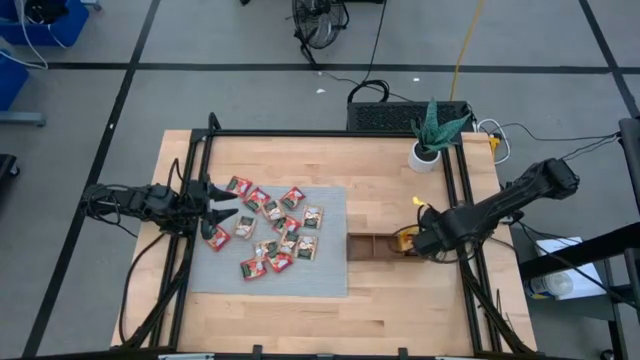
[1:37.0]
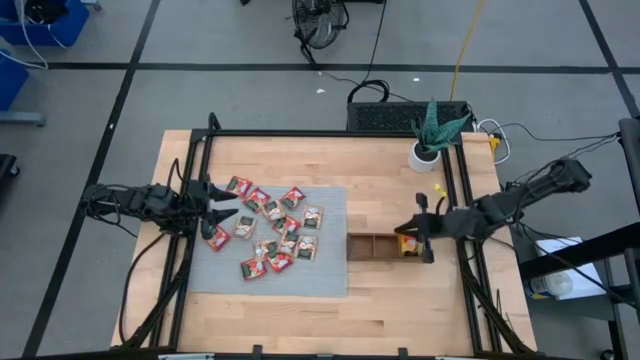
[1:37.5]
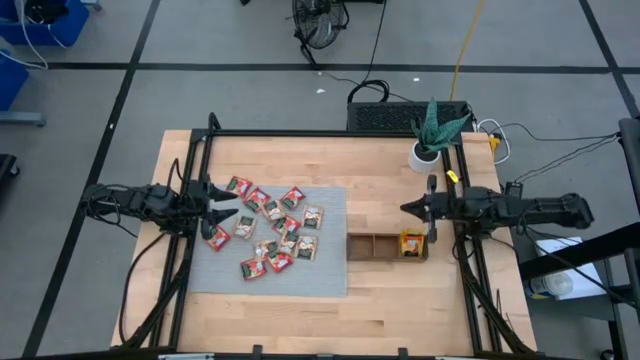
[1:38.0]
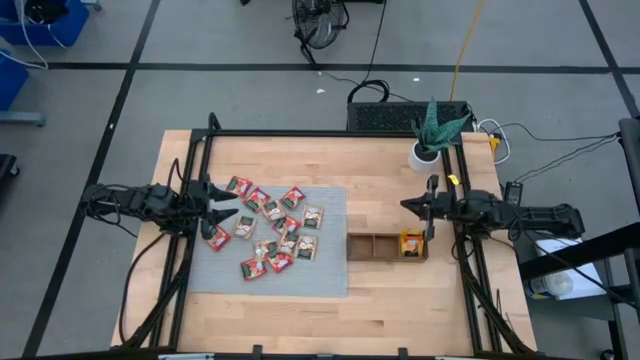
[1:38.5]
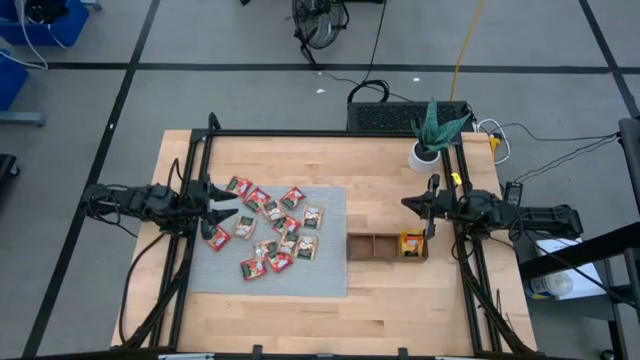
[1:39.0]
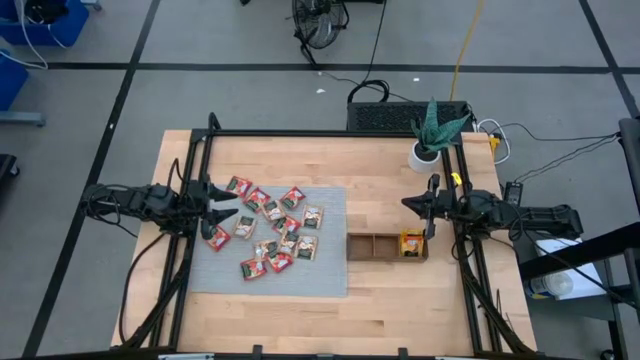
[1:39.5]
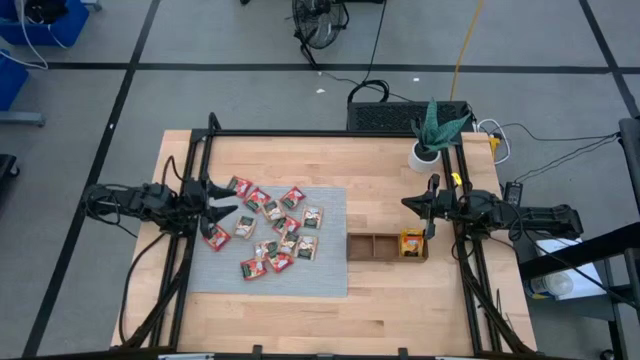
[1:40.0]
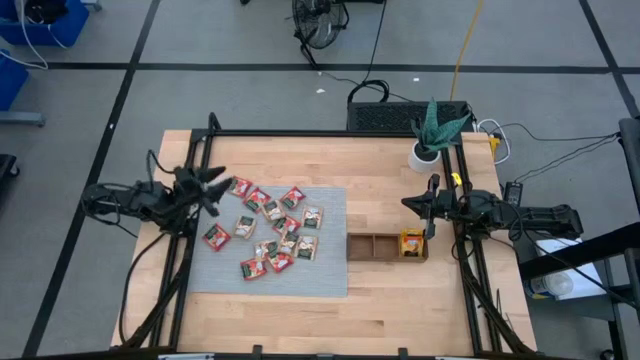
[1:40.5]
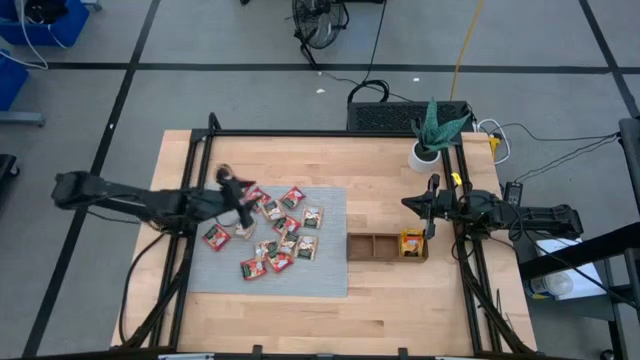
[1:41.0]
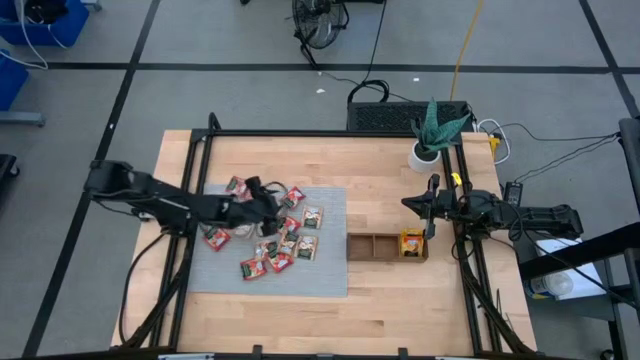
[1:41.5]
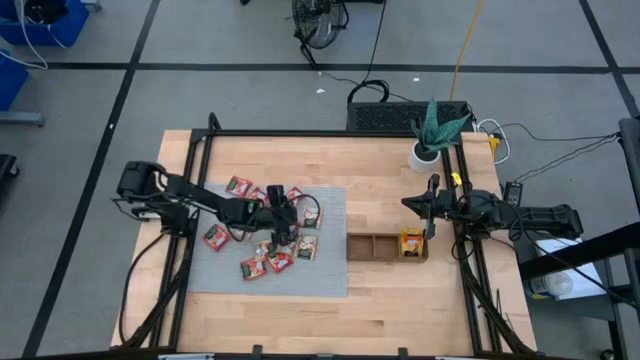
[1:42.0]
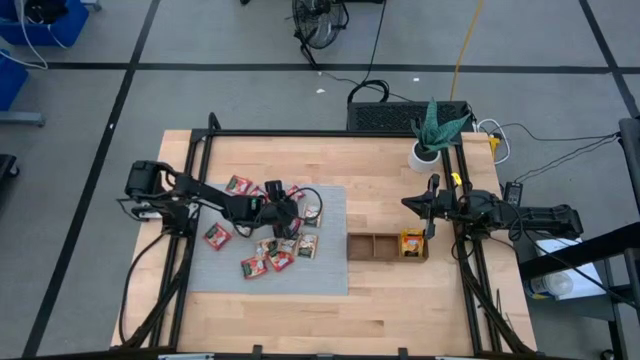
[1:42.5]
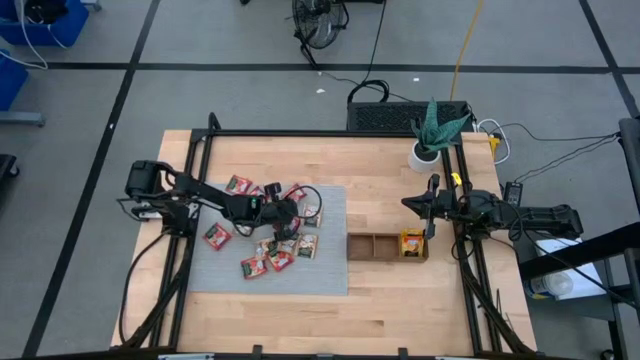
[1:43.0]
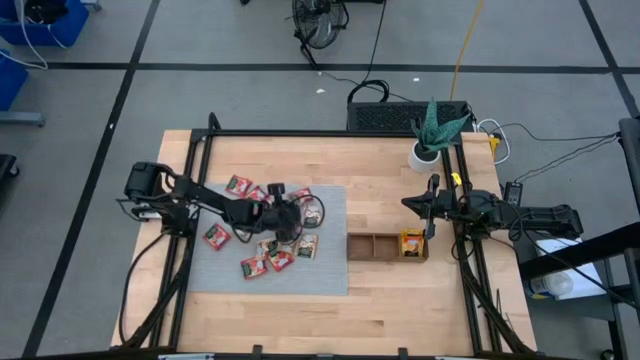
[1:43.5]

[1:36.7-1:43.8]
Task: Pick & Place Tea
Put the red tea bag into the middle section of the wooden organizer

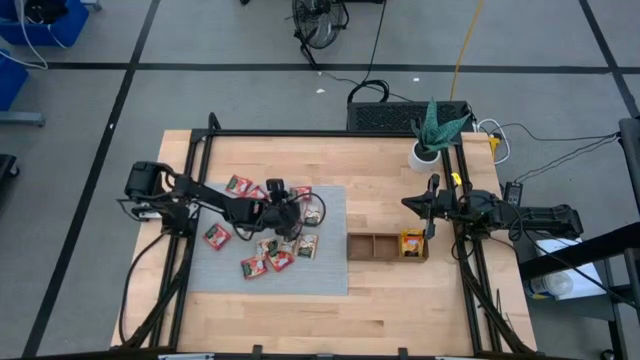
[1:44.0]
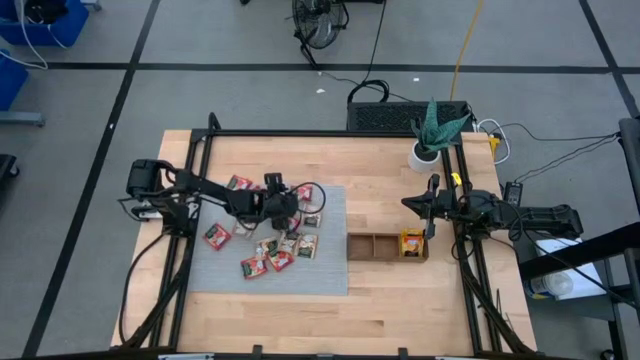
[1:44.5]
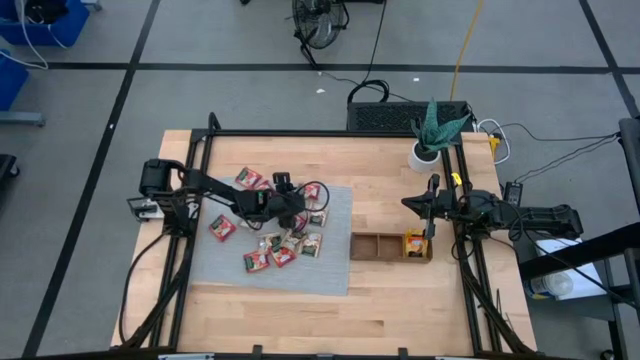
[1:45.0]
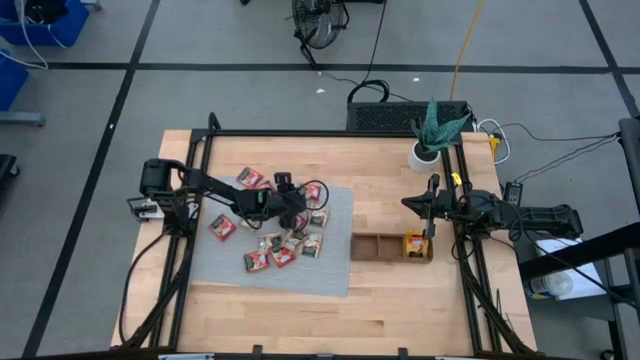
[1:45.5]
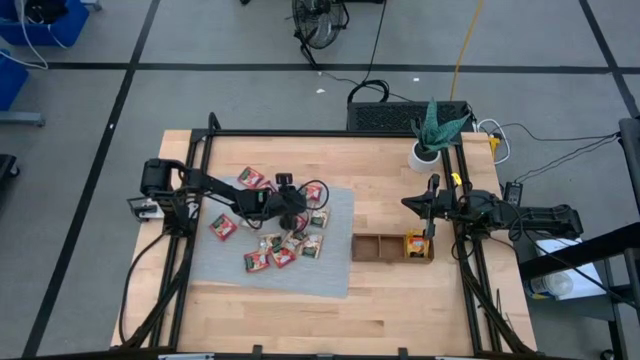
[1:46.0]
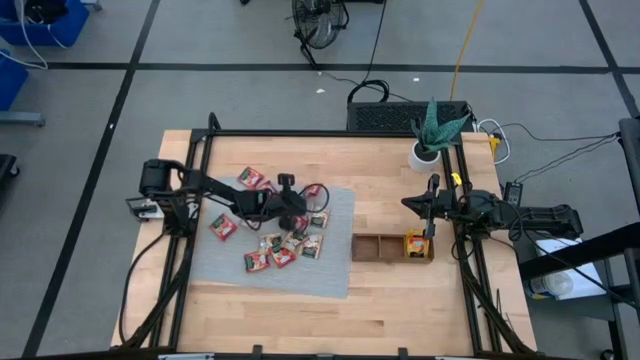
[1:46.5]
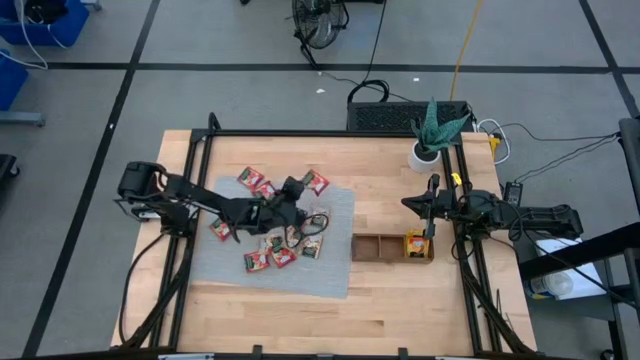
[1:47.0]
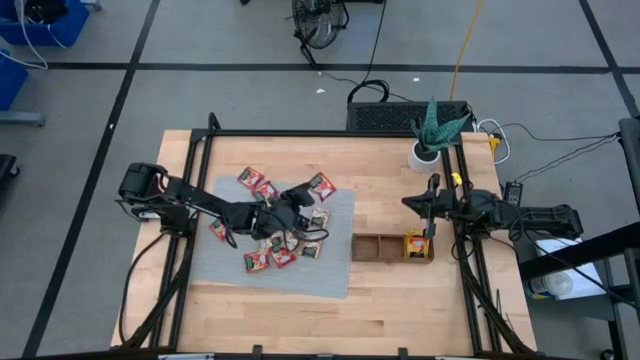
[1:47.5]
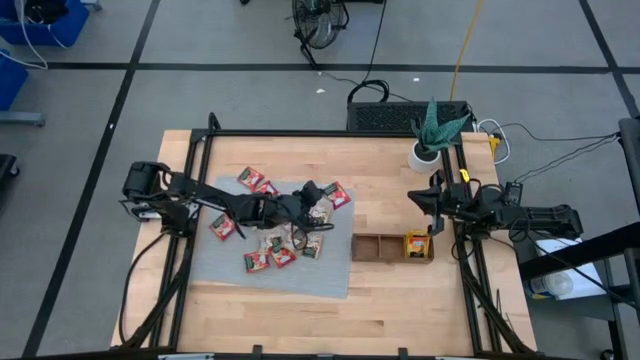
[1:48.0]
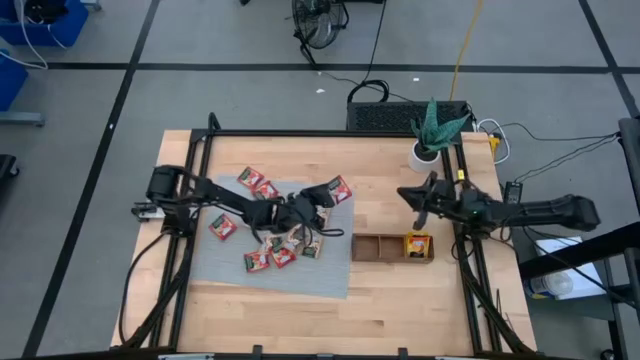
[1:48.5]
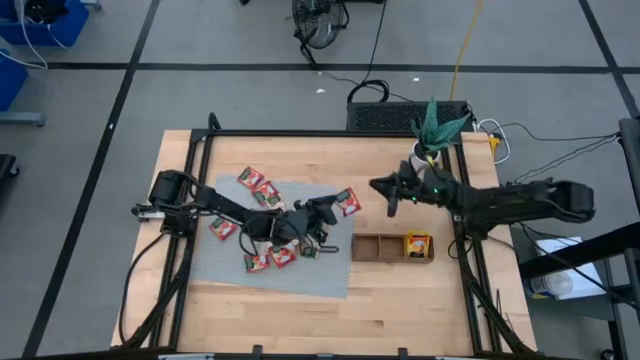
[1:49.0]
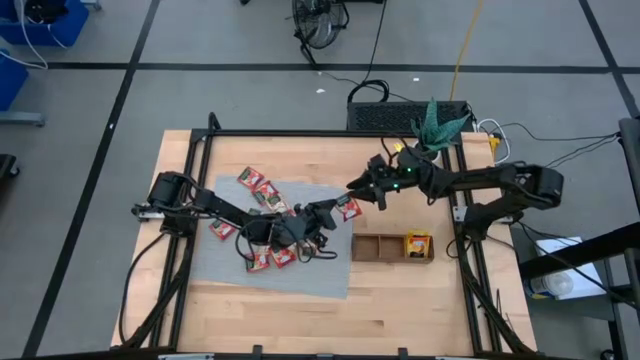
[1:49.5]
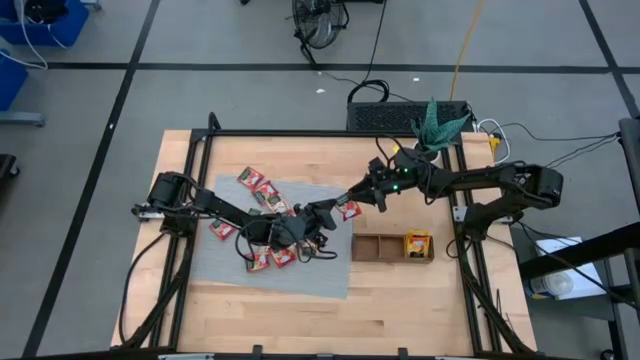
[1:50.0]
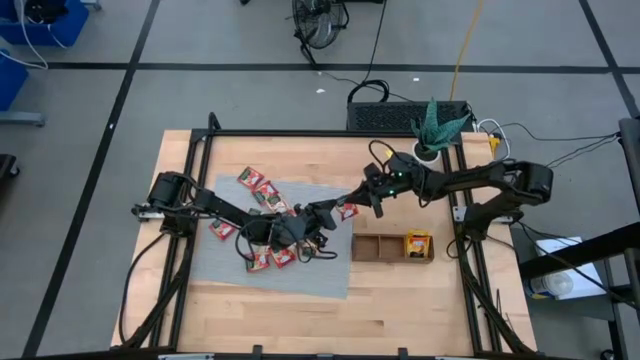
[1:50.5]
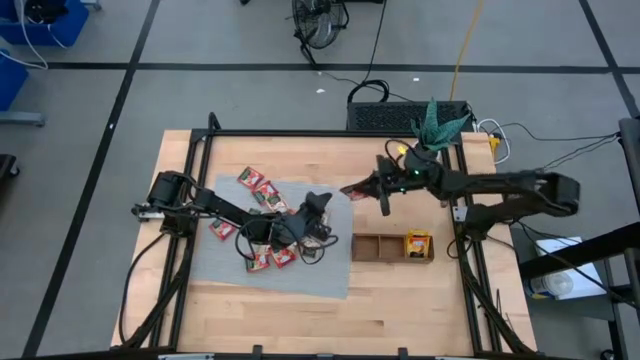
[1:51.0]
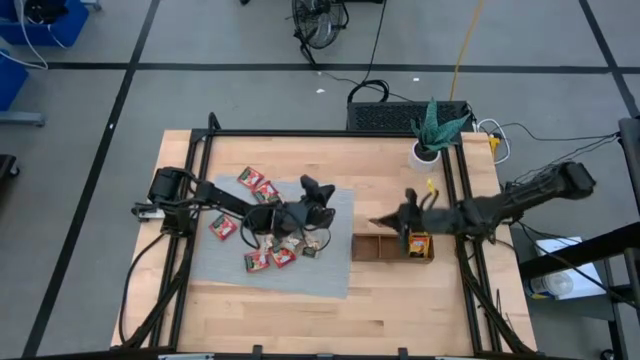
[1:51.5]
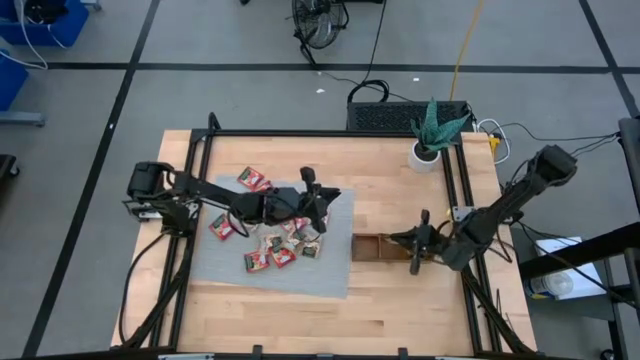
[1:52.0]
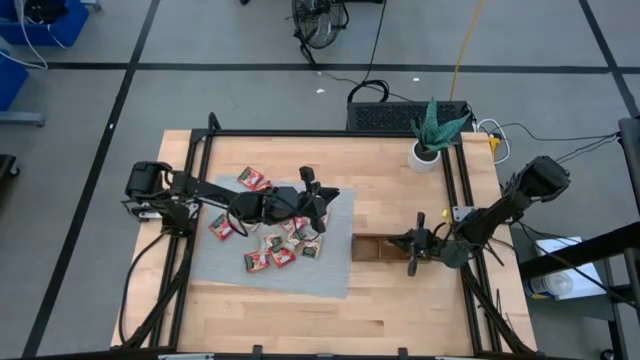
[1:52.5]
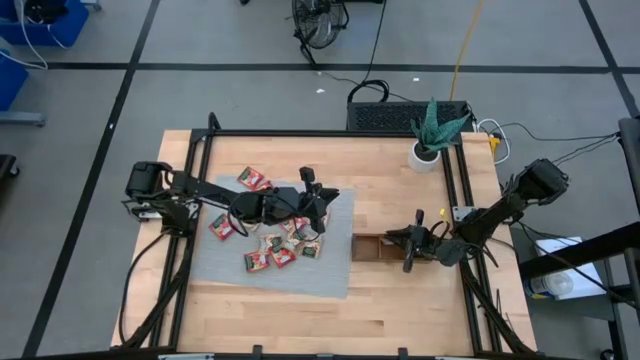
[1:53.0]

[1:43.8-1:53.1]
Put the red tea bag into the middle section of the wooden organizer

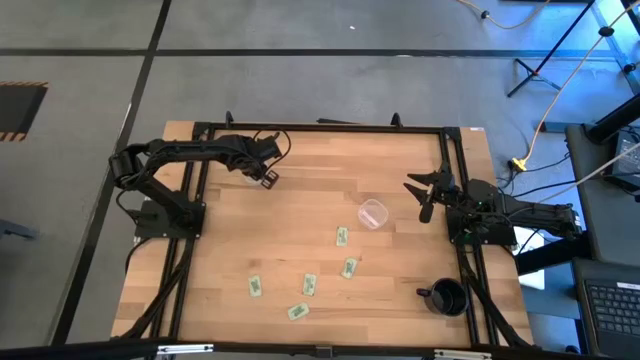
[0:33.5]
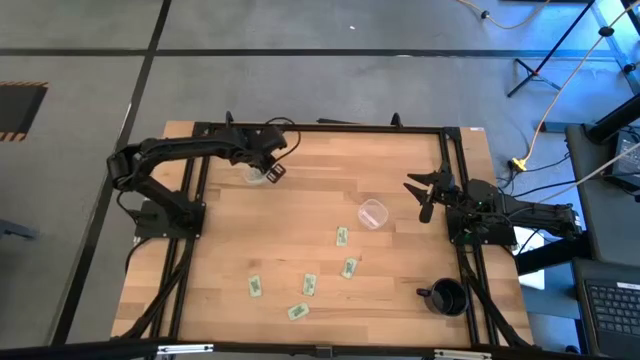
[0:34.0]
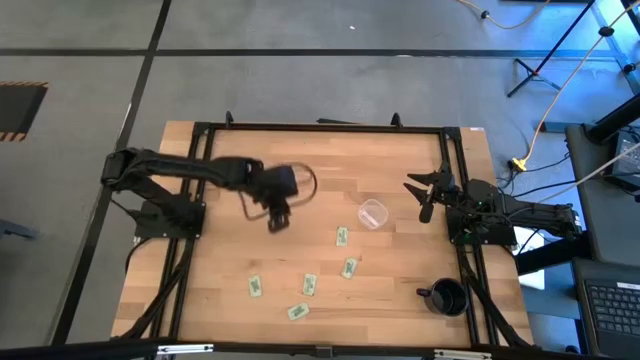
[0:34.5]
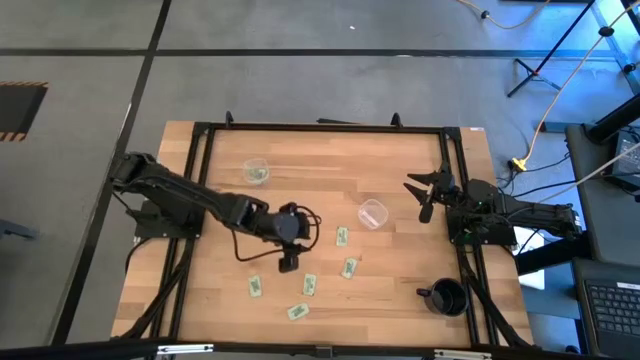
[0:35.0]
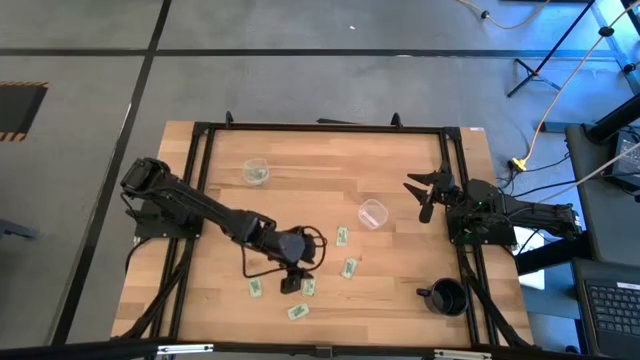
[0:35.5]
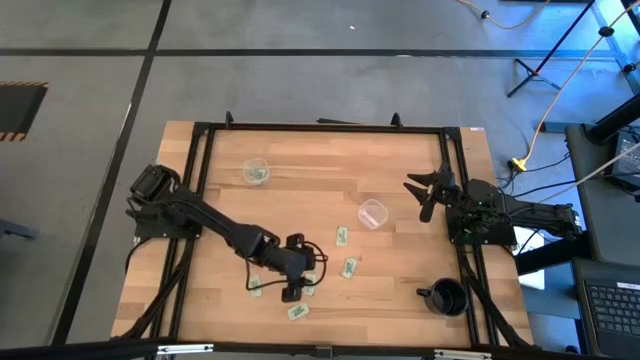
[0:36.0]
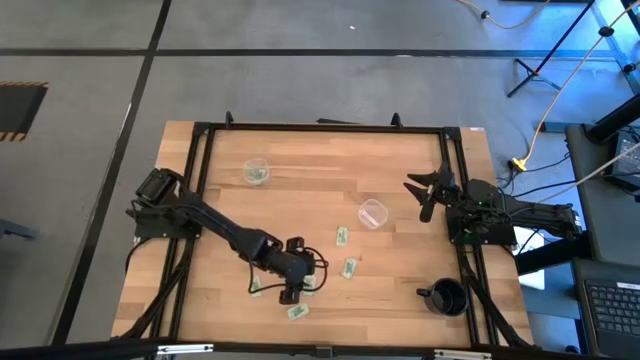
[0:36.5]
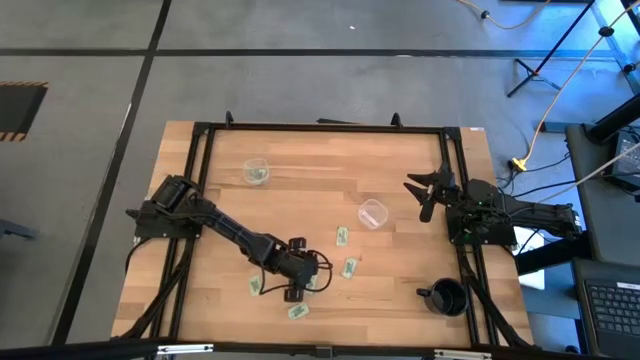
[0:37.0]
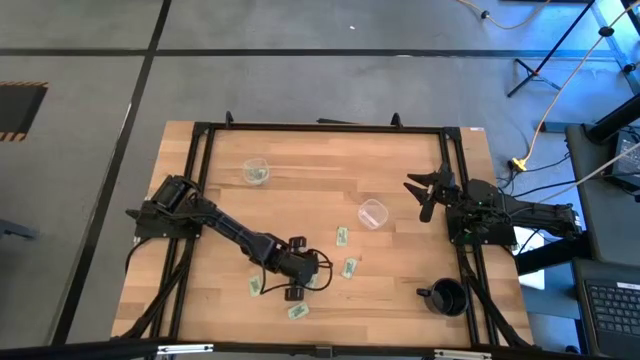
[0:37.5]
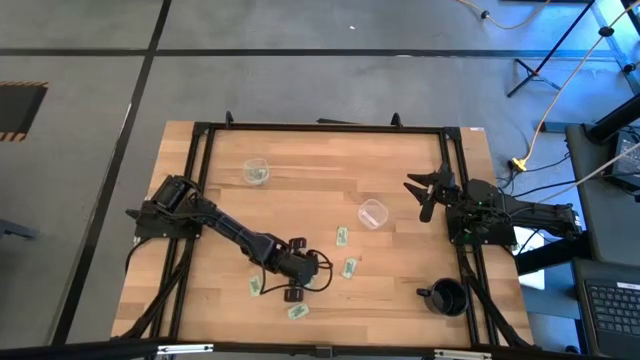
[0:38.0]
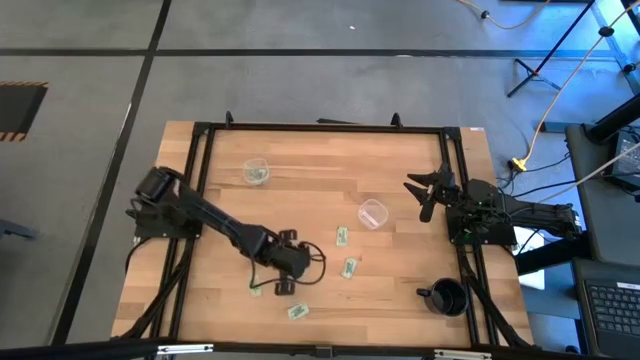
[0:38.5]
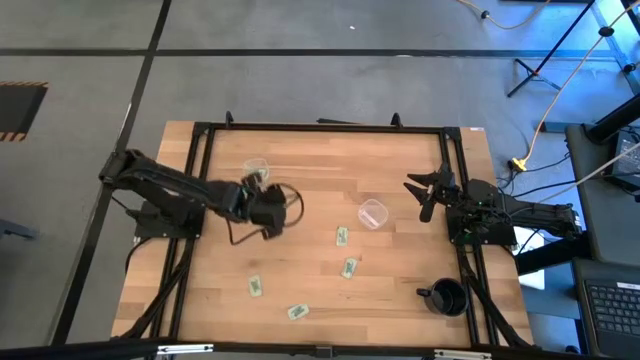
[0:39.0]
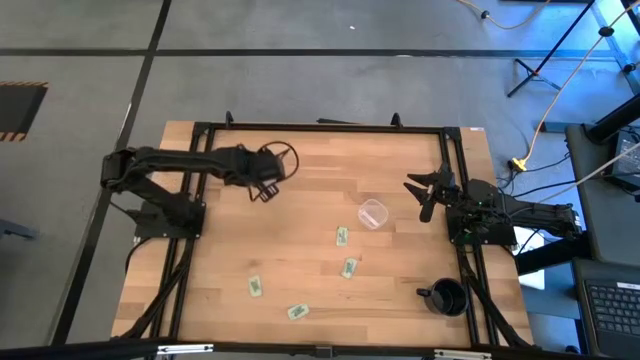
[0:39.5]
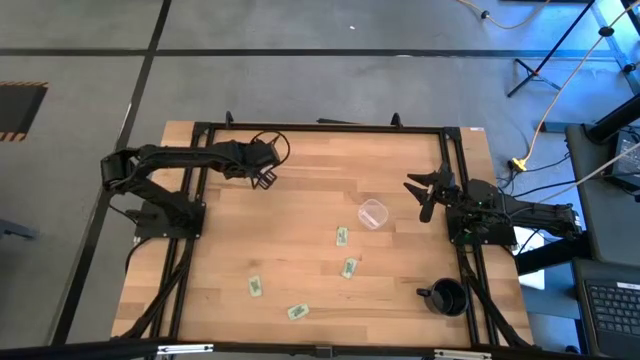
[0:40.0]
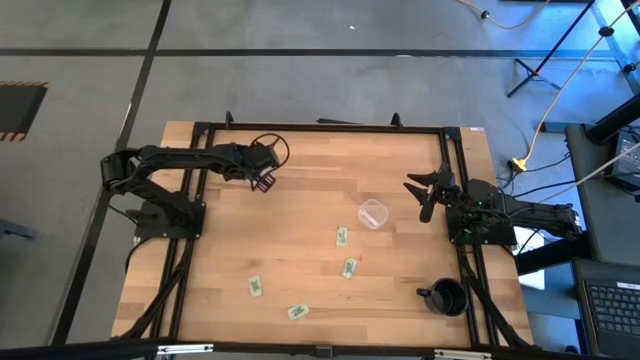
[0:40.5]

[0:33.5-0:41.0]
Task: Pick and place Stevia / Truvia into bins
Put the green stevia packet into the left white container
